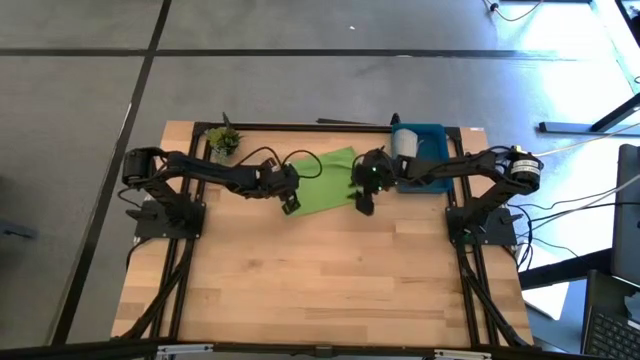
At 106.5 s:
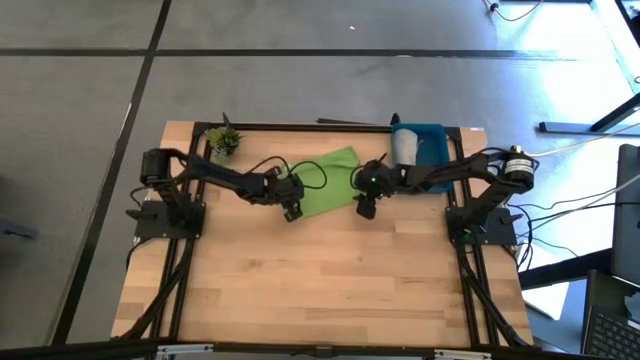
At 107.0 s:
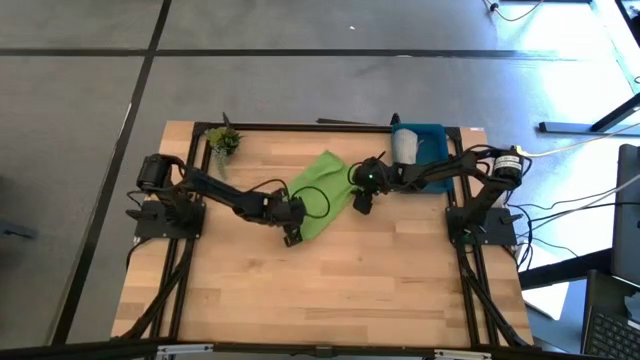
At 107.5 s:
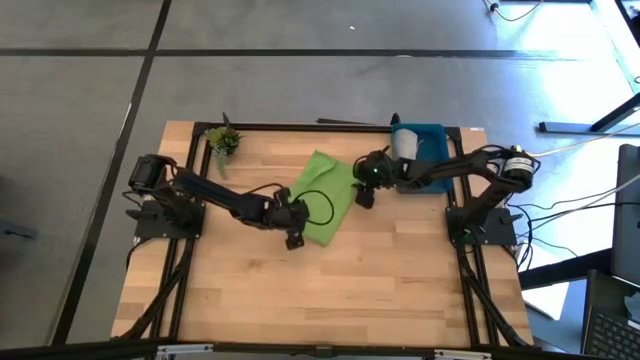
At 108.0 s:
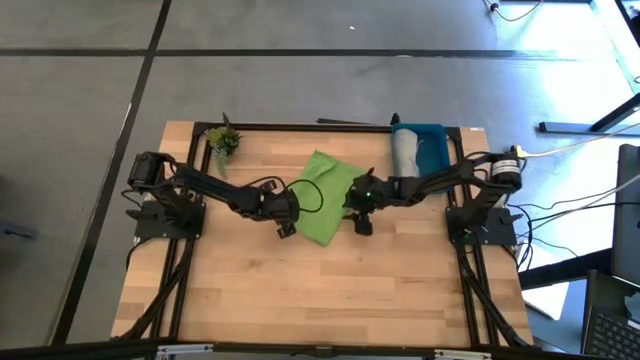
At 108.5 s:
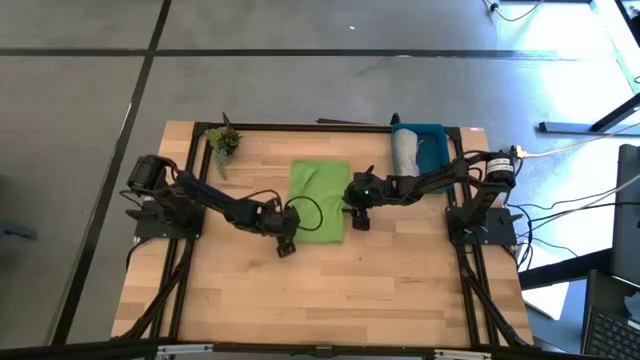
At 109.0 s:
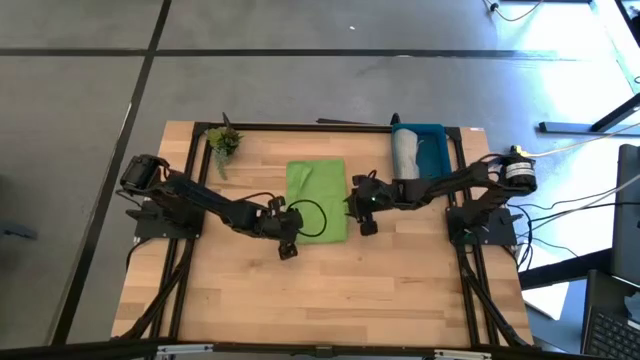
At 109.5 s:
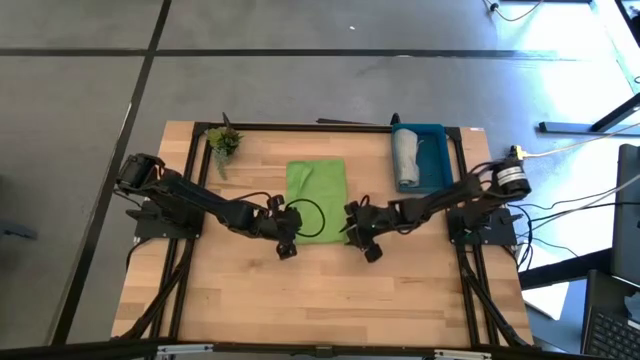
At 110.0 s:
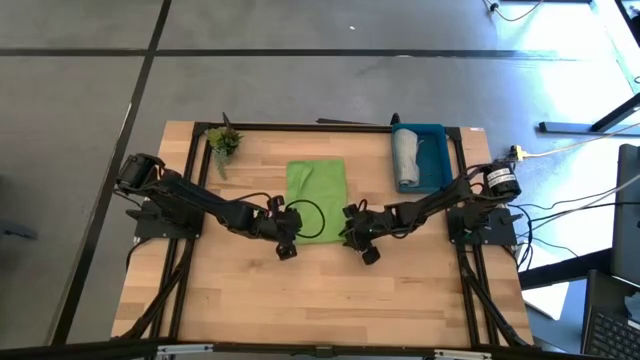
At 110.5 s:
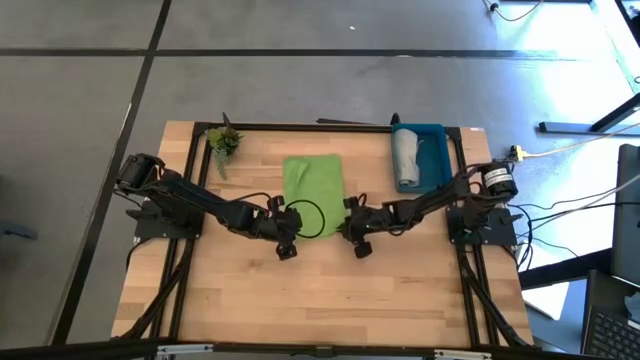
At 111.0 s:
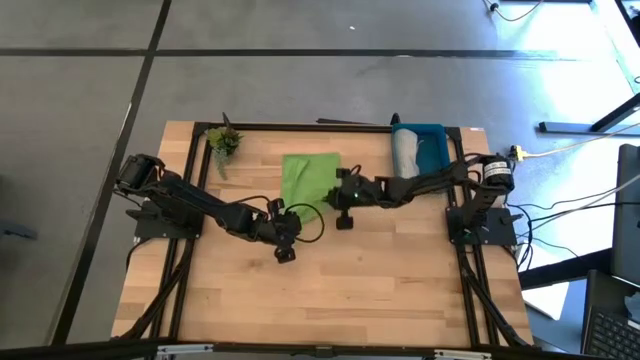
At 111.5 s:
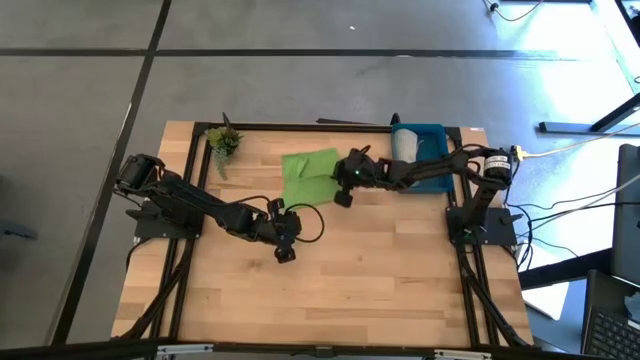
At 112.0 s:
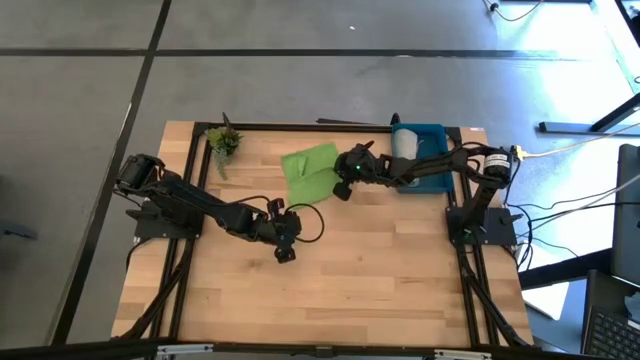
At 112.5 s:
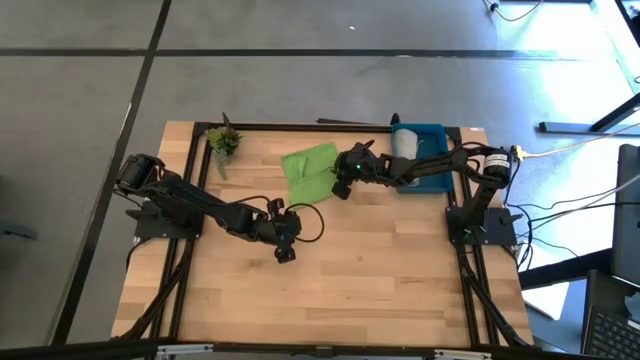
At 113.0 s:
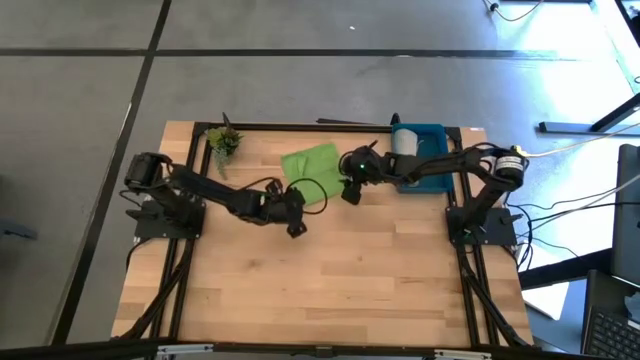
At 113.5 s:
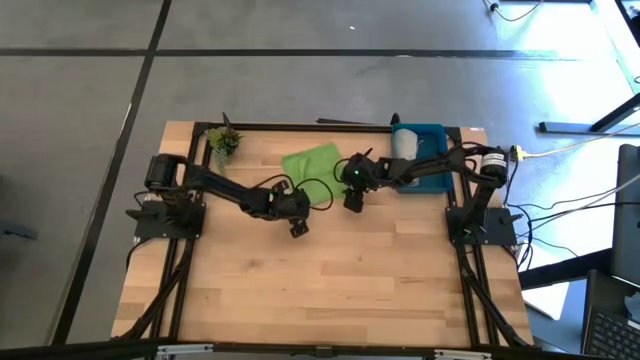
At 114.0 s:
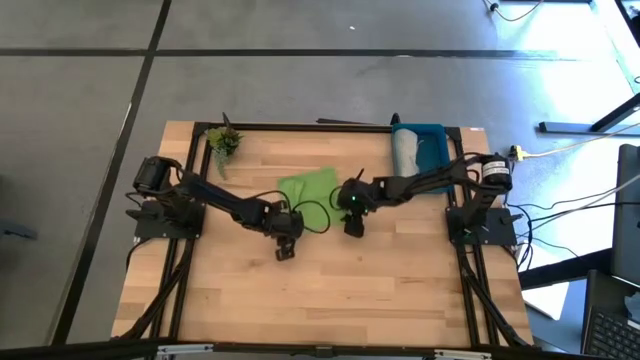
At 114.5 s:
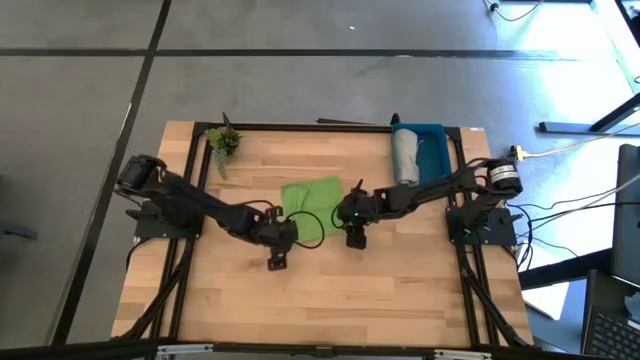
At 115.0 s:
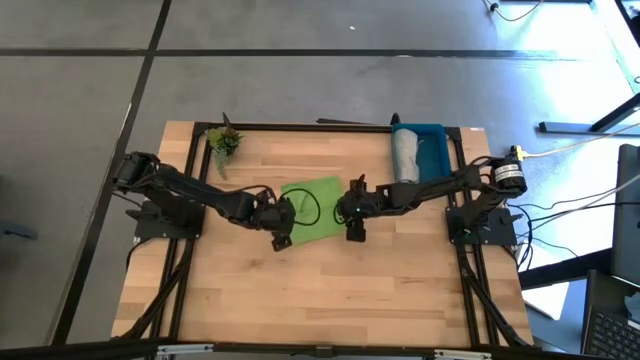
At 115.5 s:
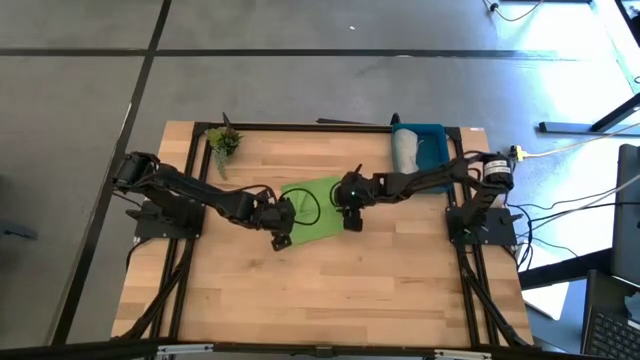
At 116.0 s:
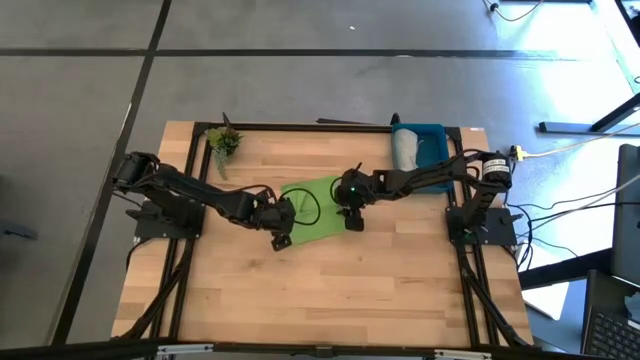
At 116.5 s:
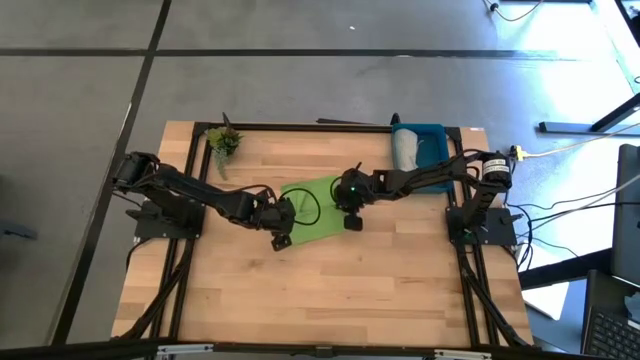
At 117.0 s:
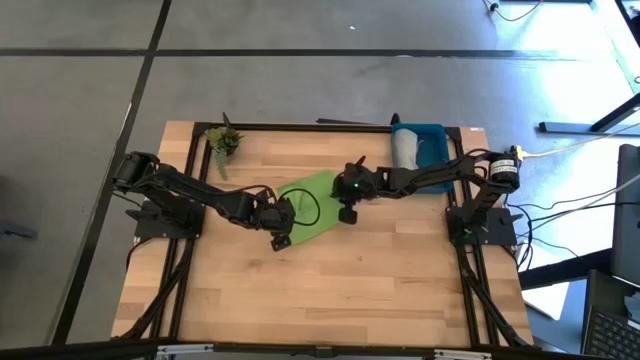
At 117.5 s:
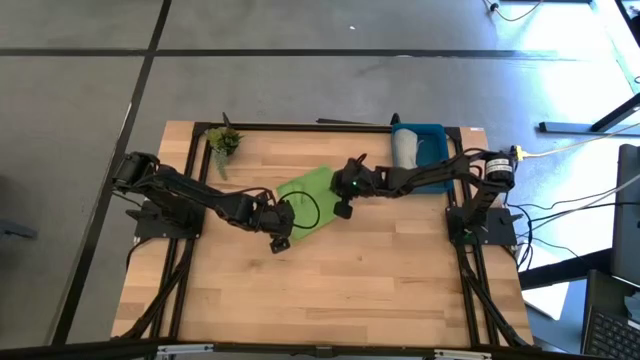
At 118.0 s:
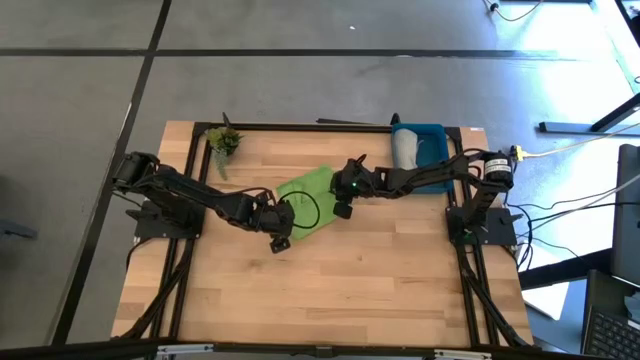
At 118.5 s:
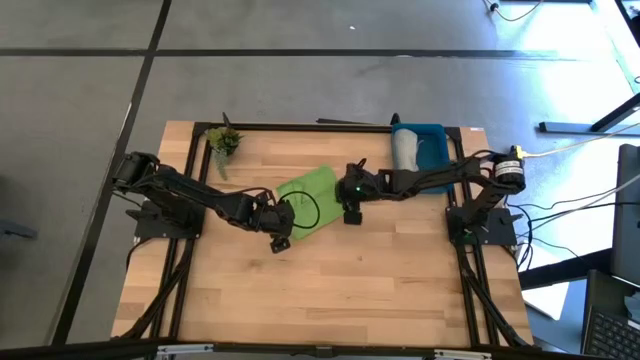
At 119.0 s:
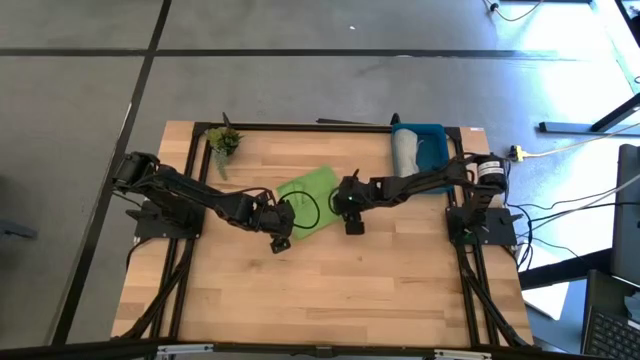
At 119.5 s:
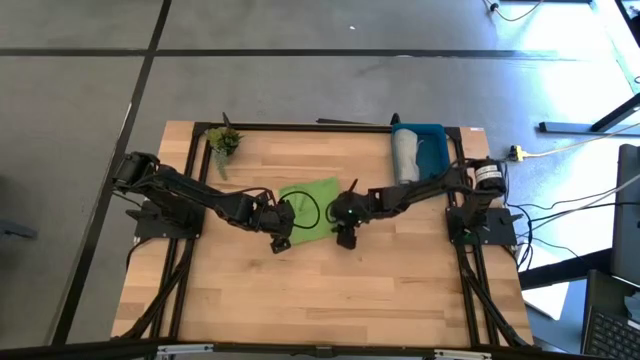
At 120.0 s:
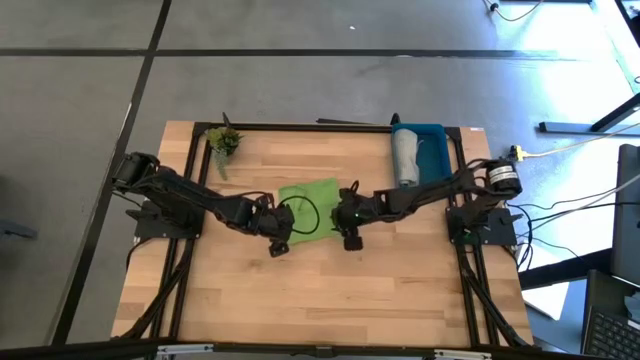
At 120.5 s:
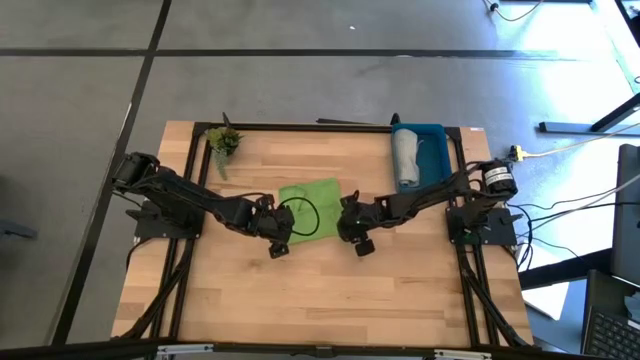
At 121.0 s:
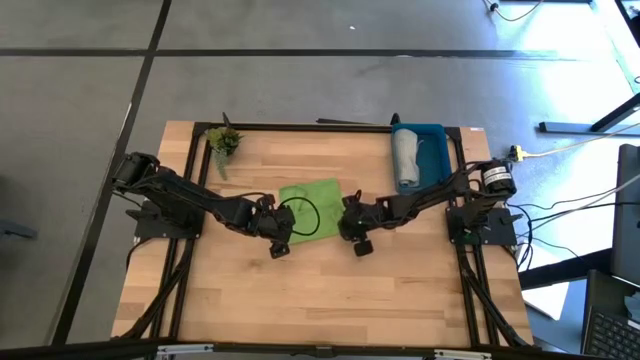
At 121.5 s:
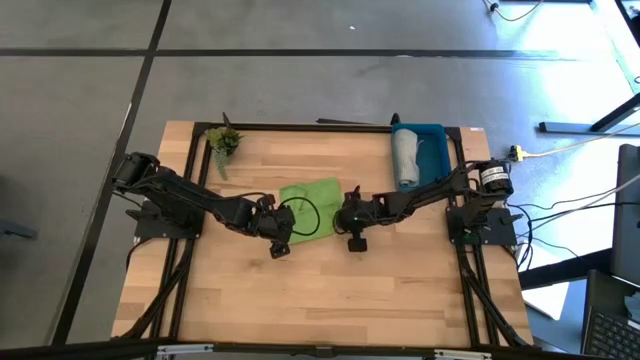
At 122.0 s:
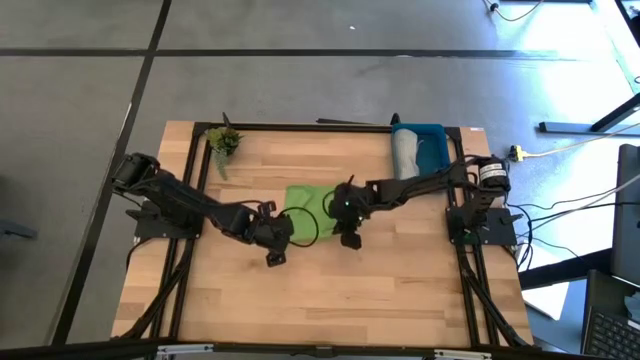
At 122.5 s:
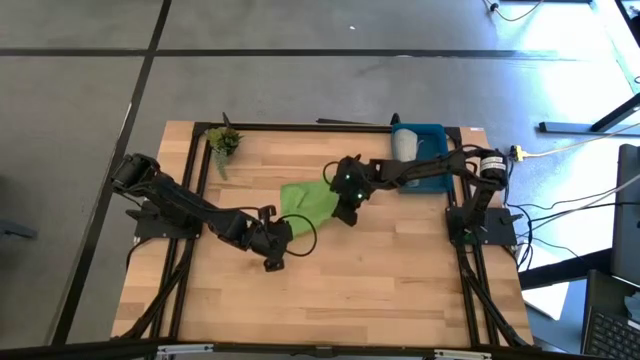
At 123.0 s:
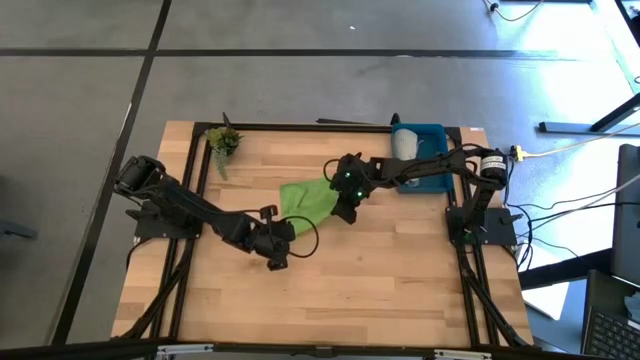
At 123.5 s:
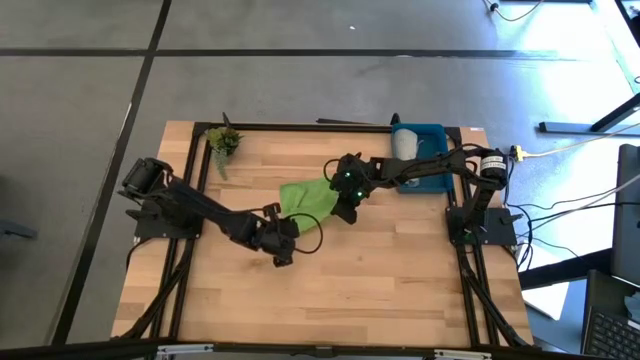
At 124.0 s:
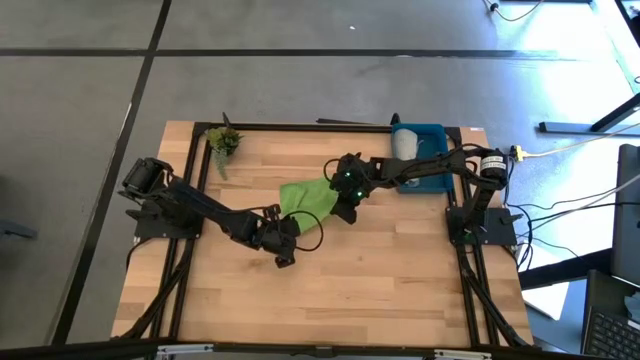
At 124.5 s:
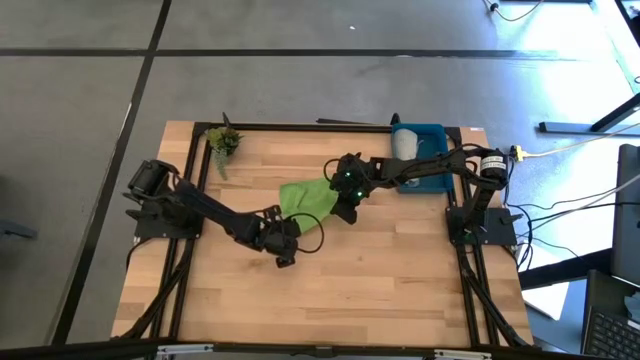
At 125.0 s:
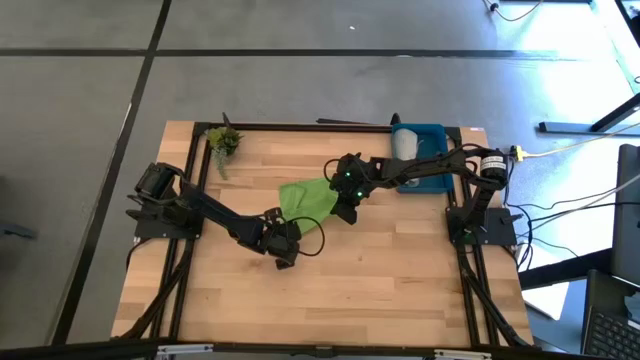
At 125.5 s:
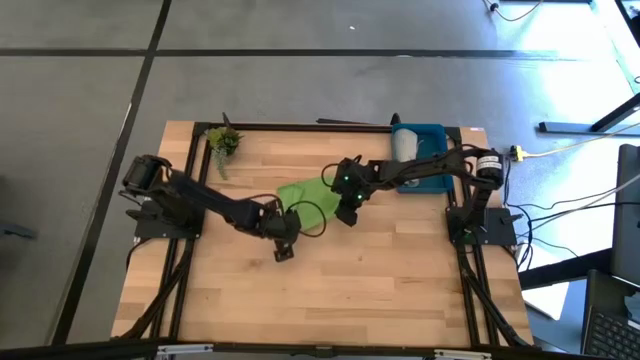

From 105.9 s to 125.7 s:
Task: Roll microfiber towels into tight, uniform cylinder then place into a basket
Roll the green towel

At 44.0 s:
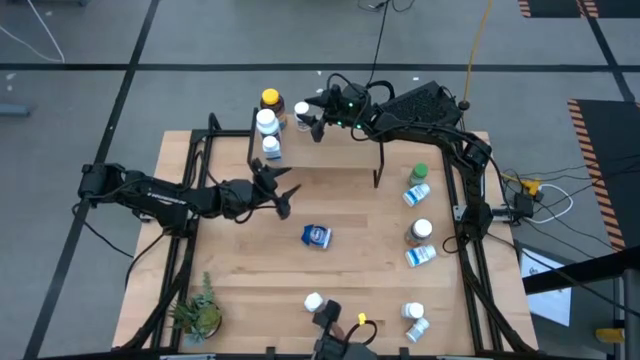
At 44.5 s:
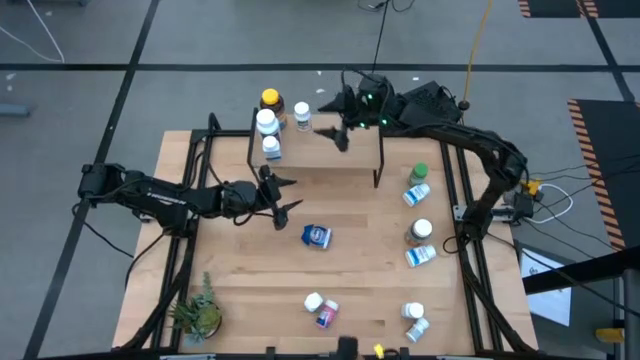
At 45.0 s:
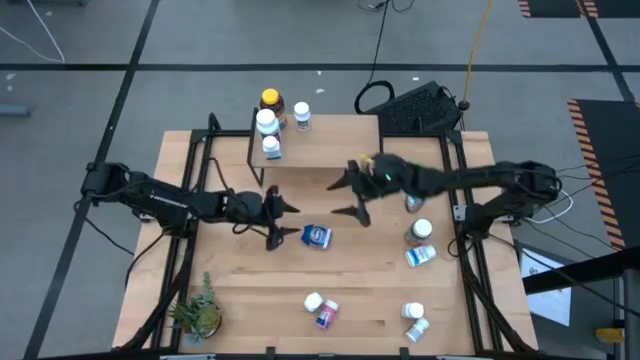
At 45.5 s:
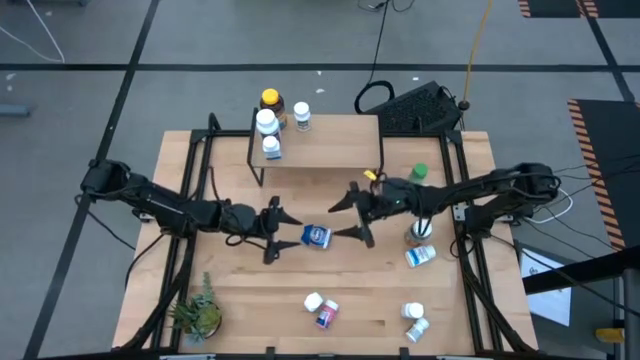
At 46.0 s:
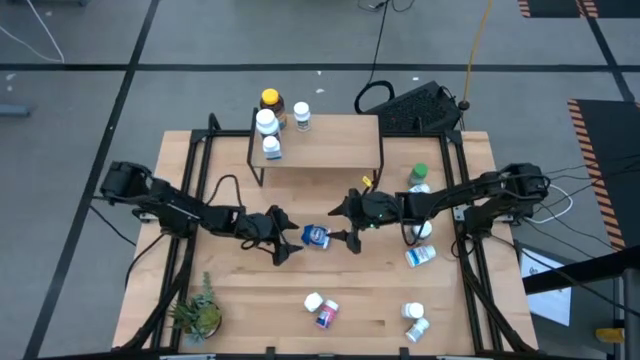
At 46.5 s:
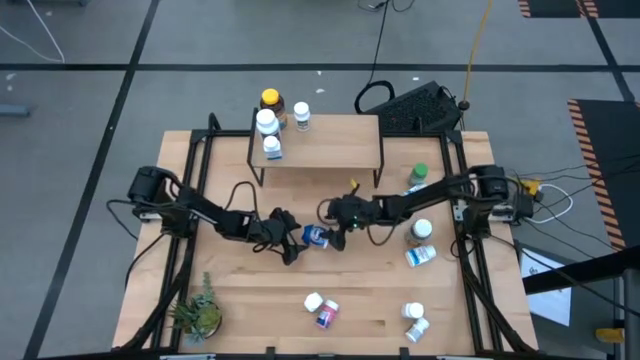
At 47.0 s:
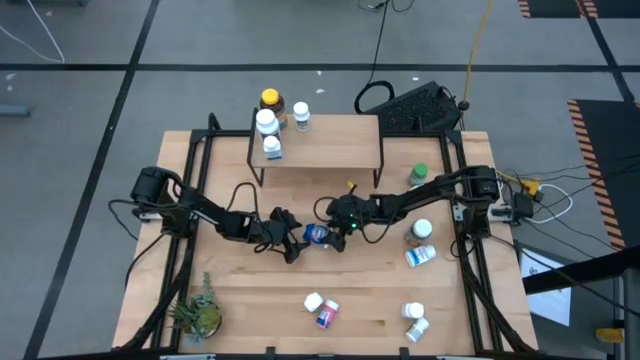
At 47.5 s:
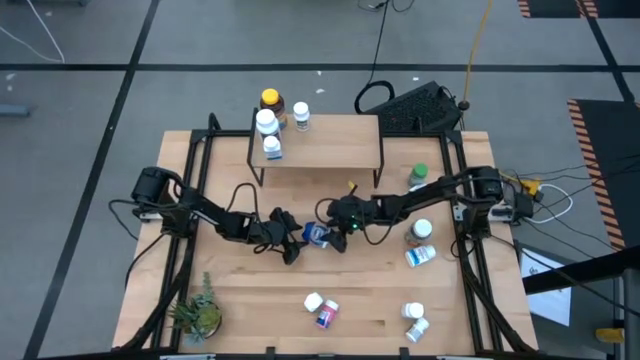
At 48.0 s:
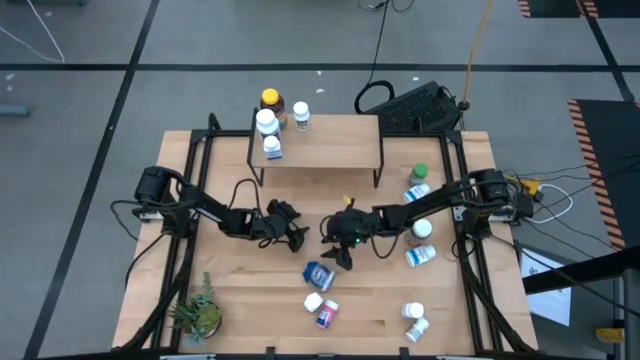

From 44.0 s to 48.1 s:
Task: Pick and place medicine bottles onto shelf by color
Put the blue medicine bottle on the shelf
